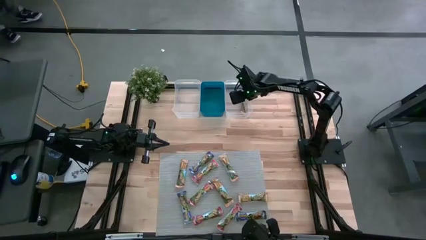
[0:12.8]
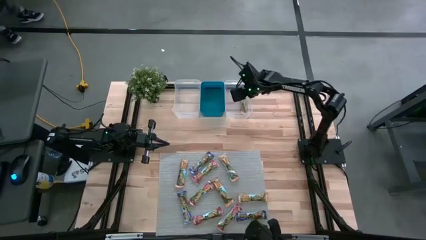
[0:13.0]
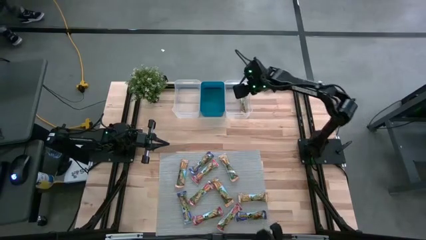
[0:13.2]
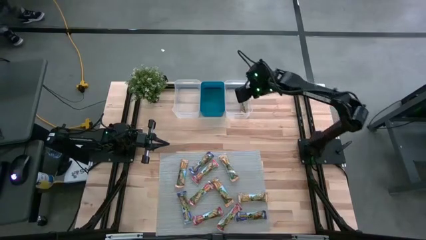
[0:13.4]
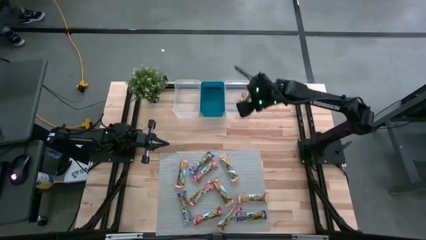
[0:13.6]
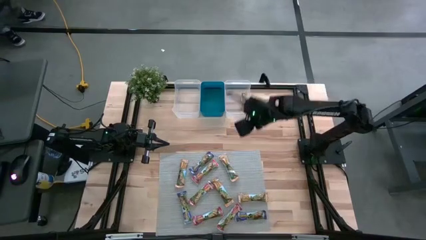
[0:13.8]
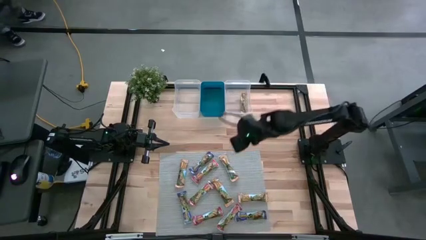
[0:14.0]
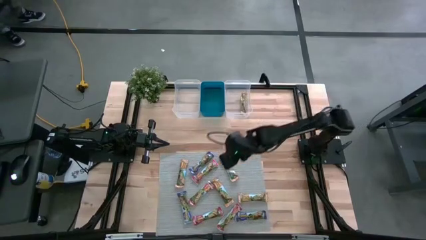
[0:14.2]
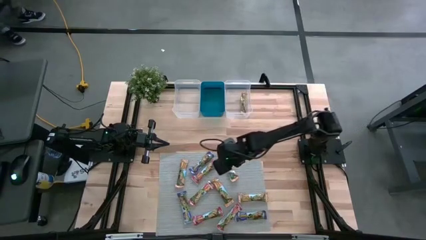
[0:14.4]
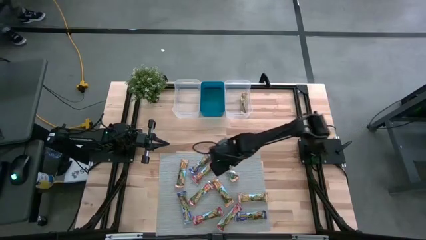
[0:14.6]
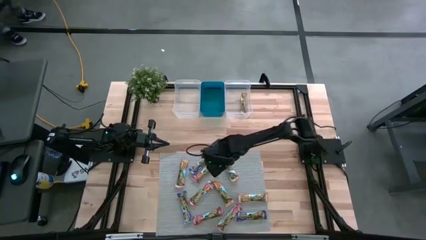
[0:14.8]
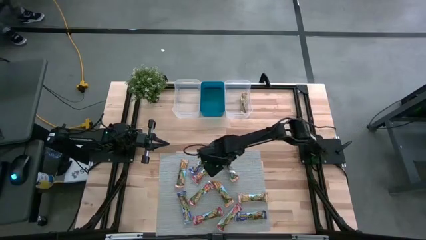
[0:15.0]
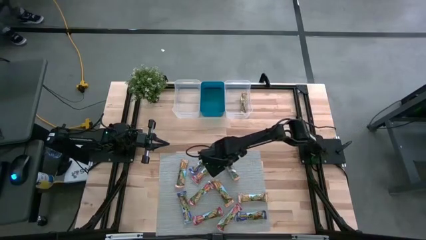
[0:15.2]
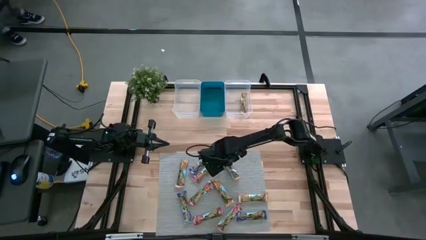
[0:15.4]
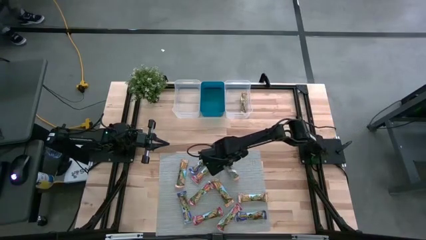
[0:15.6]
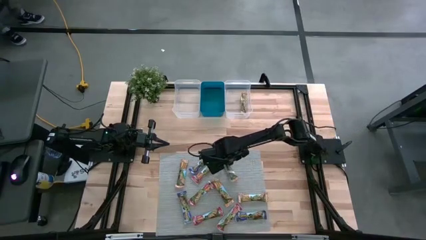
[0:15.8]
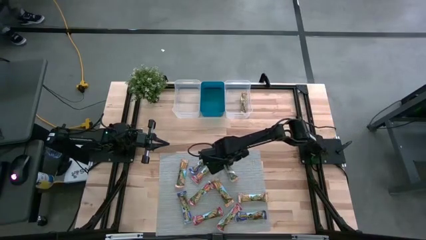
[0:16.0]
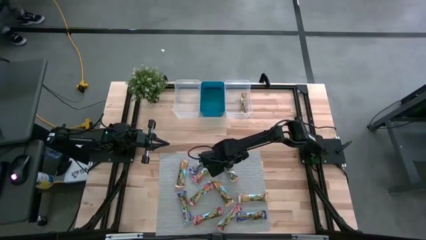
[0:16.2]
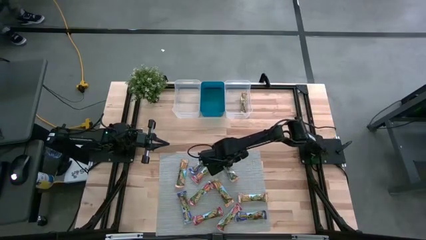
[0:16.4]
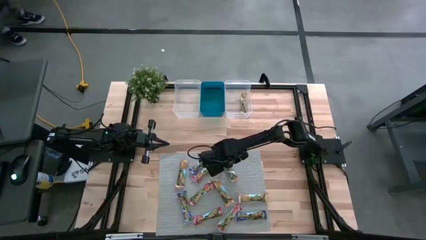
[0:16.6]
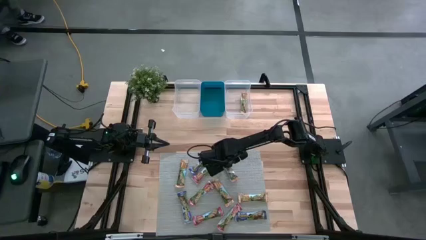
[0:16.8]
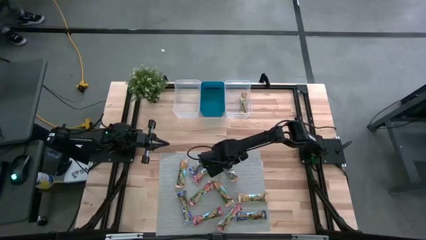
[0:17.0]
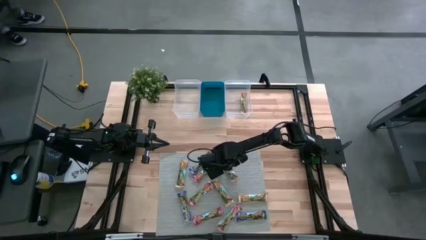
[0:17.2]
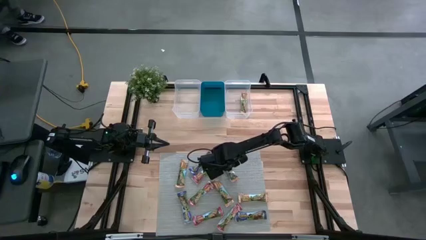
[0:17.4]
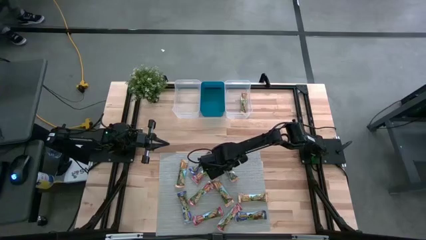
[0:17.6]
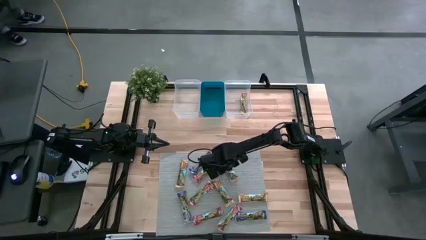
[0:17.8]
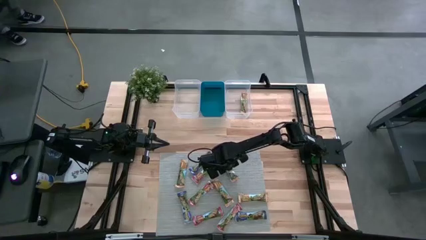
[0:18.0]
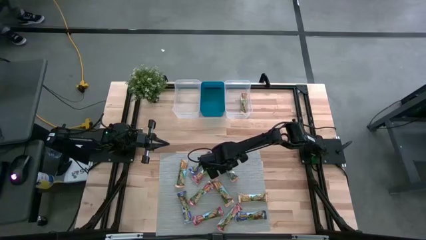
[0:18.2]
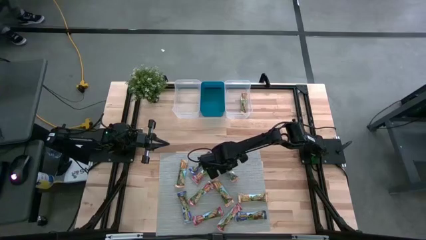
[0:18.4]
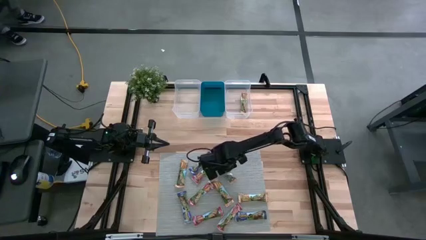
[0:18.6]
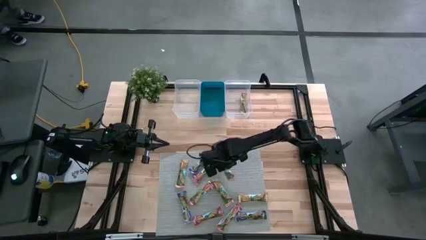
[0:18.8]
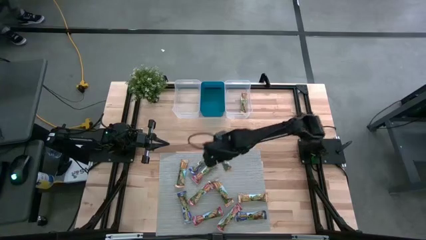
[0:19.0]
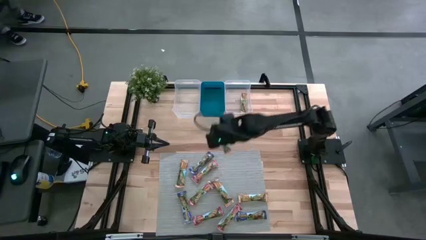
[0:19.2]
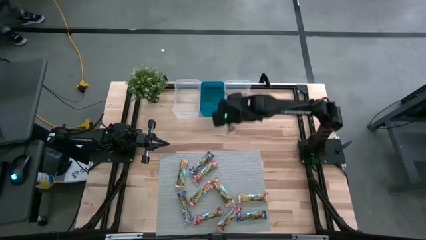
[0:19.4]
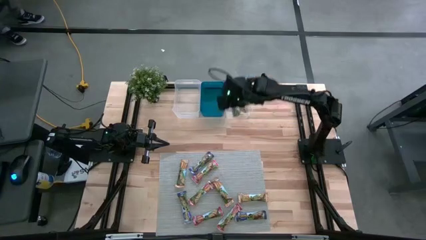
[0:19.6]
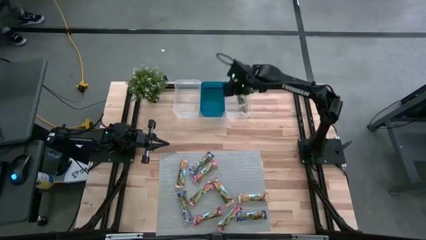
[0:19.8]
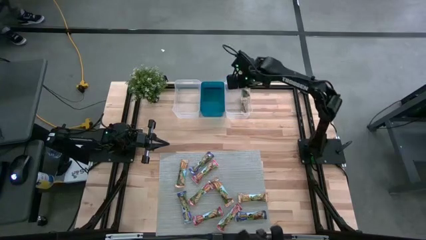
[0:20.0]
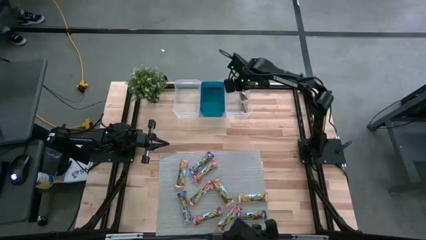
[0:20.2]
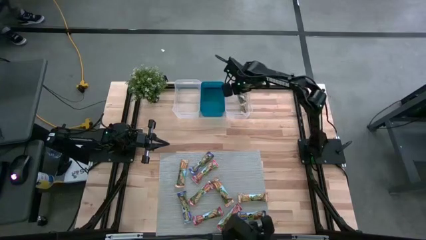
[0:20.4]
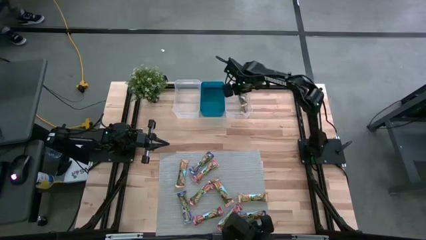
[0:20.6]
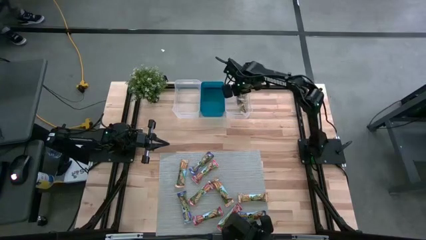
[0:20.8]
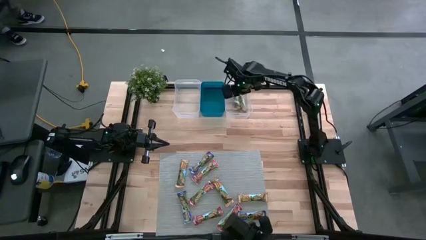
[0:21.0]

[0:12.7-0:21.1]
Task: Pick and place Granola Bars by type
Put the orange granola bar into the right transparent bin

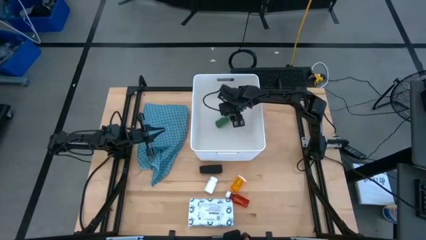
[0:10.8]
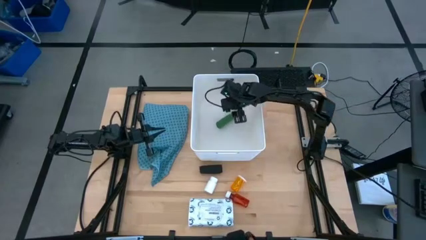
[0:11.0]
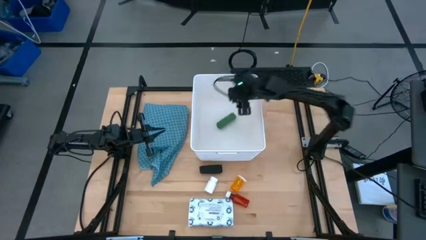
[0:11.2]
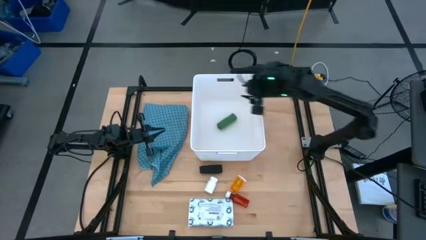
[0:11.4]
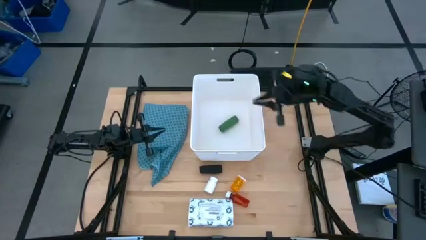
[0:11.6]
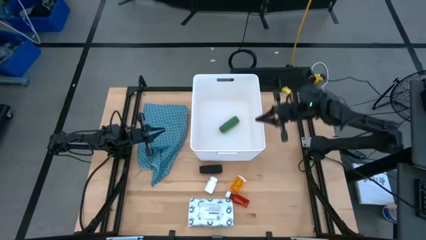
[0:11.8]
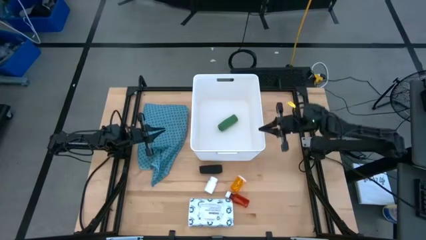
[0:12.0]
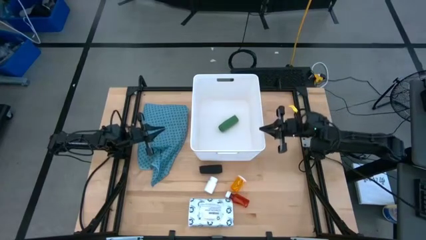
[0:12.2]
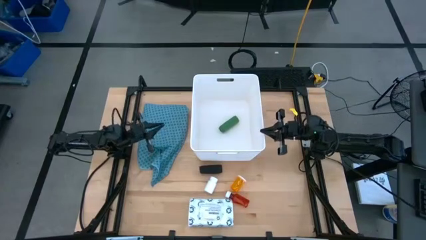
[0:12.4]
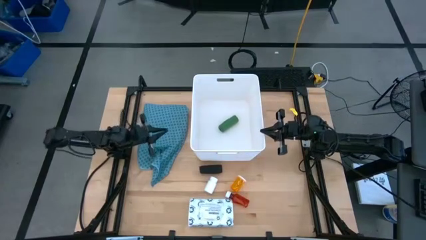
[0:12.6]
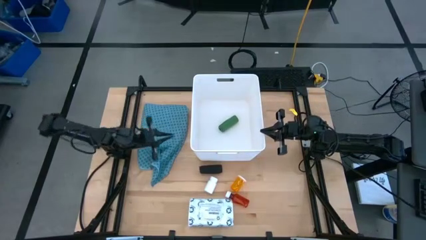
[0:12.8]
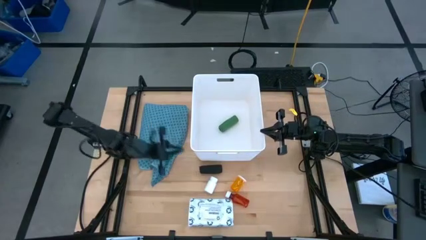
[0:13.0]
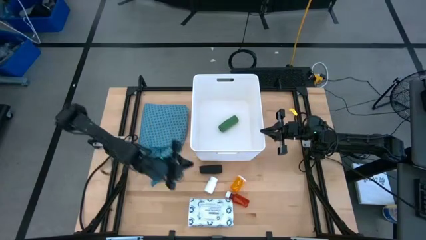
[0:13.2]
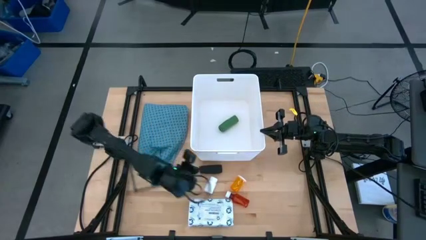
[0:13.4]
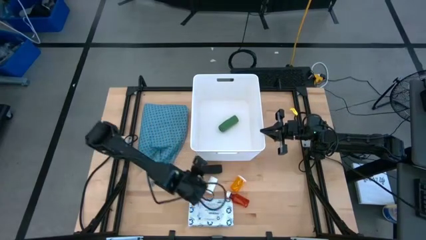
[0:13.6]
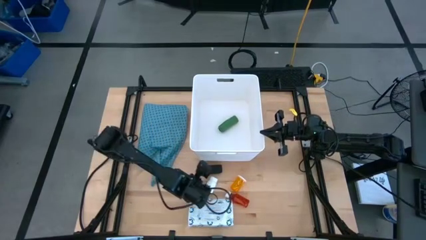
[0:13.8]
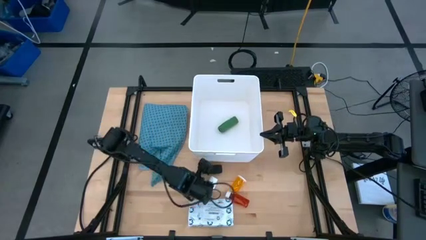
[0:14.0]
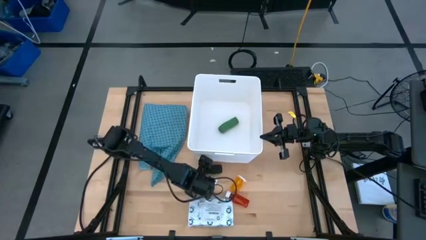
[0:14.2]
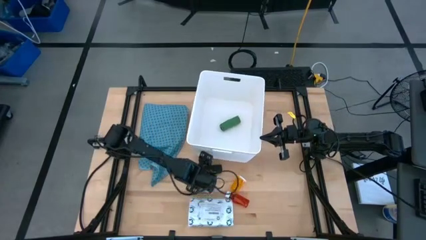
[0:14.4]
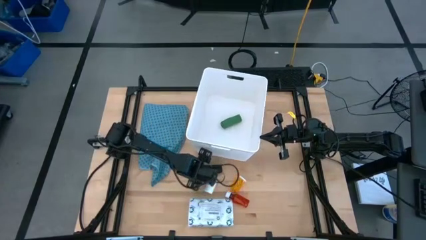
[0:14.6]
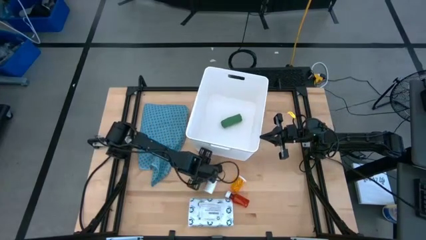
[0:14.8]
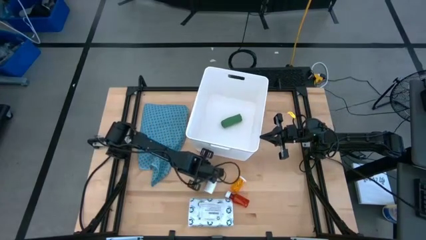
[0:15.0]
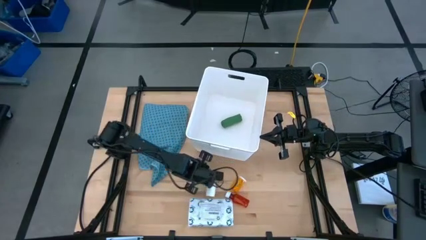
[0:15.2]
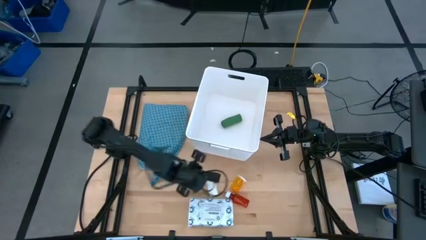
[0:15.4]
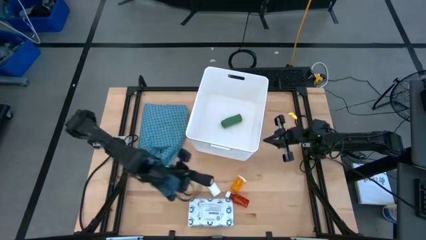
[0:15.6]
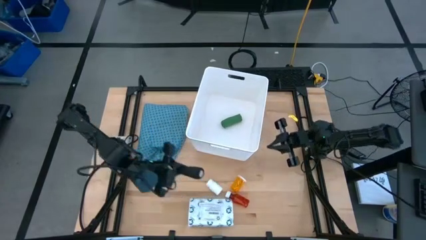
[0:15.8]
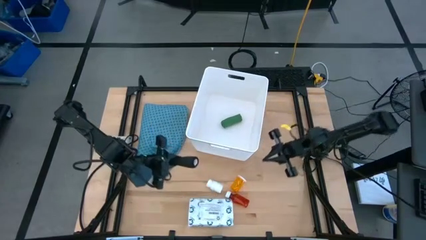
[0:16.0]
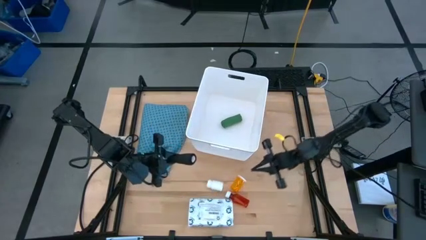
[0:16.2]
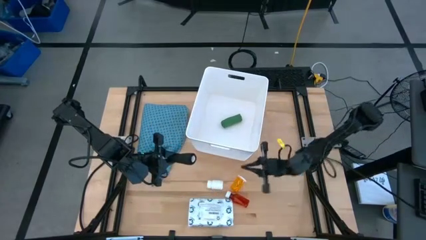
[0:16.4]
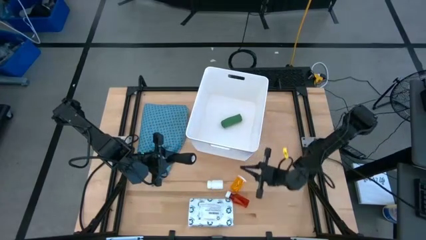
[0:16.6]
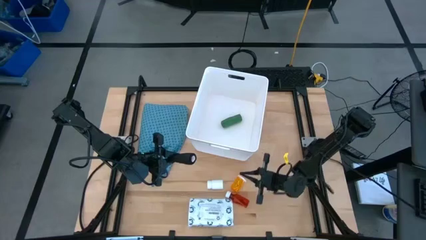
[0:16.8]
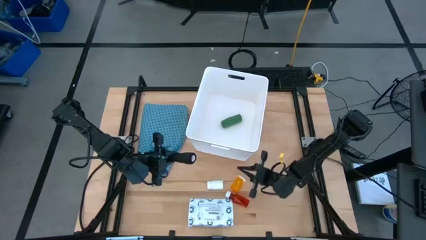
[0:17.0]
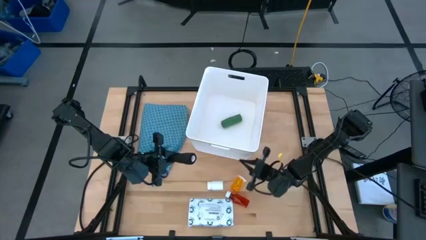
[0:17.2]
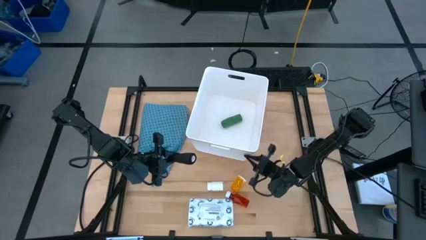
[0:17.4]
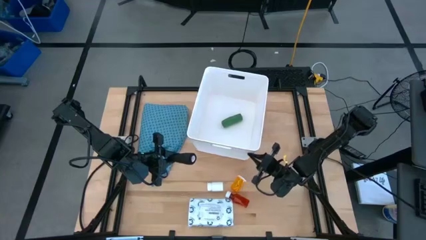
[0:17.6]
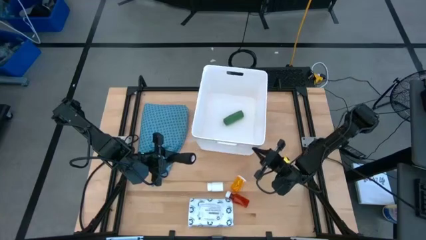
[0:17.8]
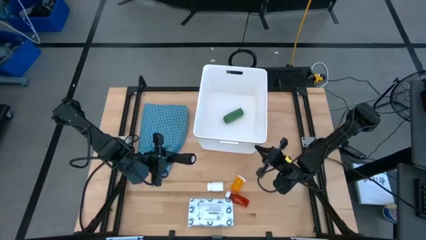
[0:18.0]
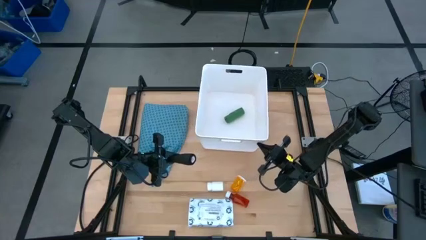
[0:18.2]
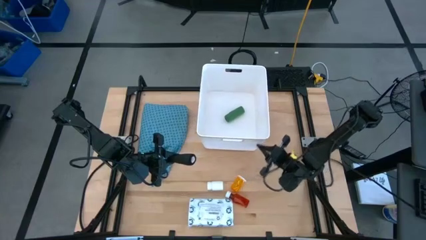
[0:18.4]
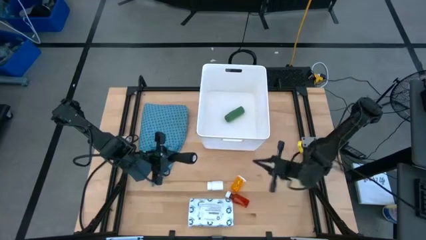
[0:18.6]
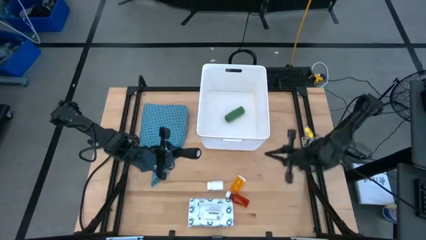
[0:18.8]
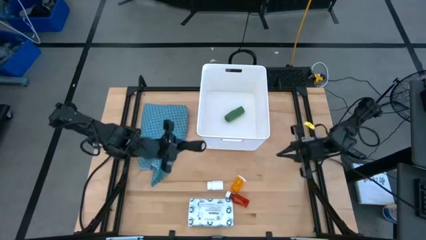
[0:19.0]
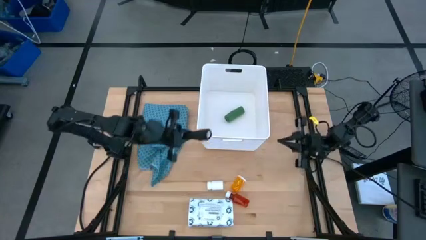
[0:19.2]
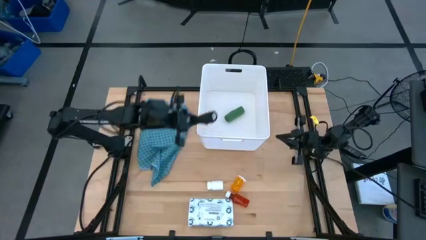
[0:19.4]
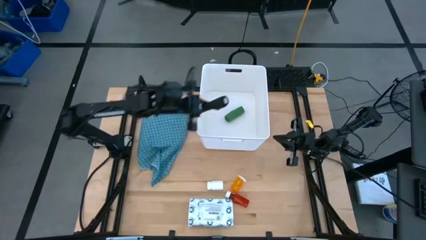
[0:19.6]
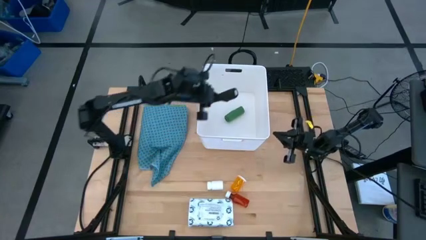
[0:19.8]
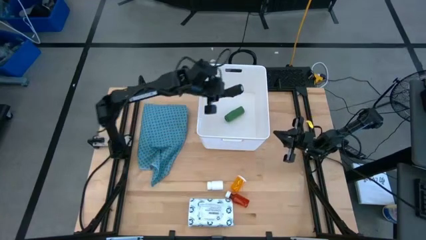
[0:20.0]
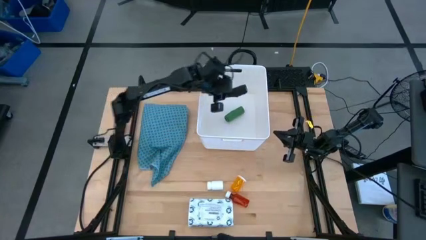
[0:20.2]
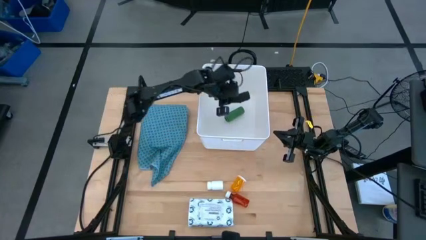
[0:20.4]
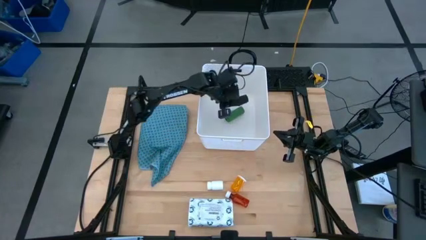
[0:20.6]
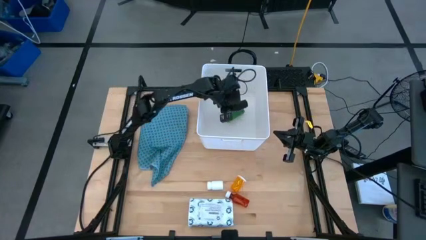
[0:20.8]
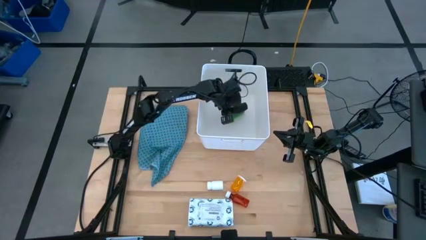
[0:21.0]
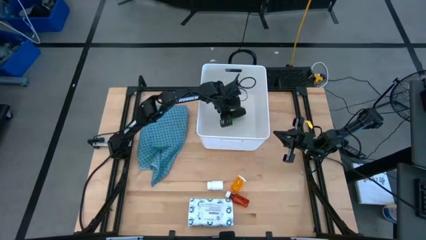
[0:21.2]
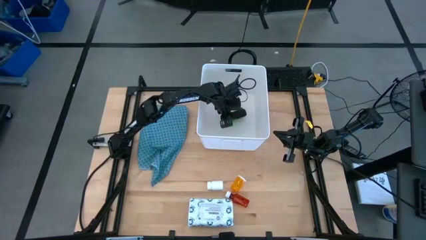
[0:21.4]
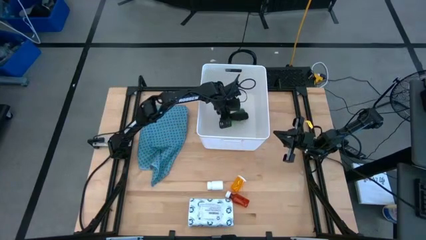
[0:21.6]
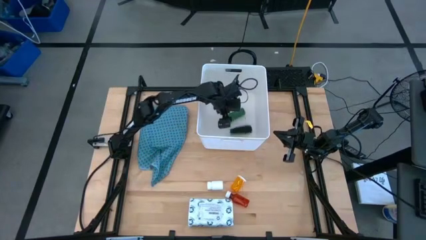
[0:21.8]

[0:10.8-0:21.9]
Task: Pick & place medical supplies in basket/bin
Put the black bandage into the white bin
